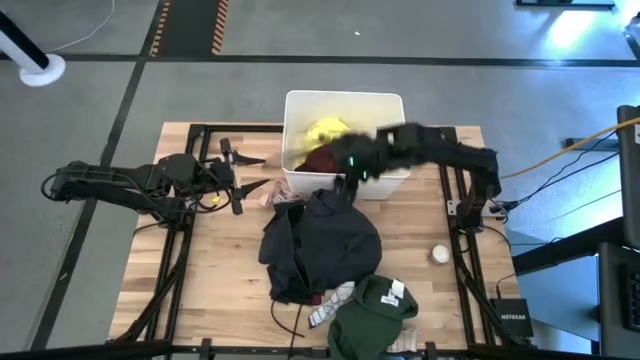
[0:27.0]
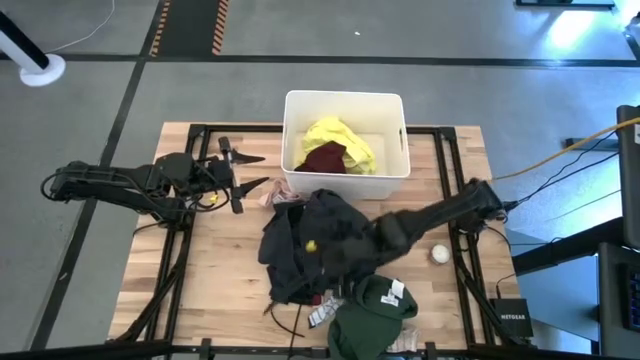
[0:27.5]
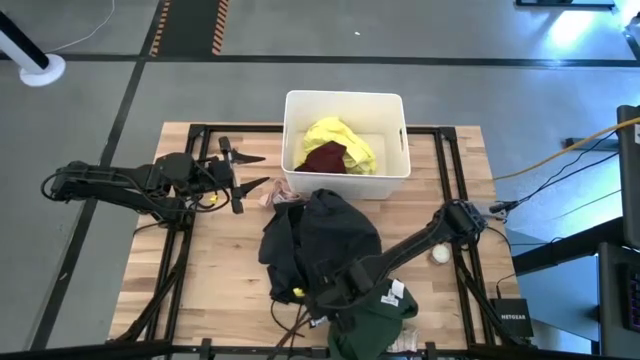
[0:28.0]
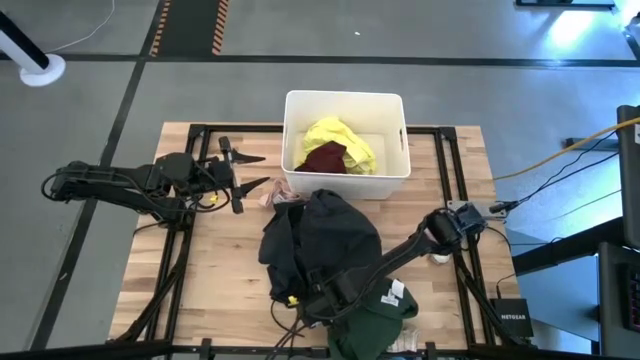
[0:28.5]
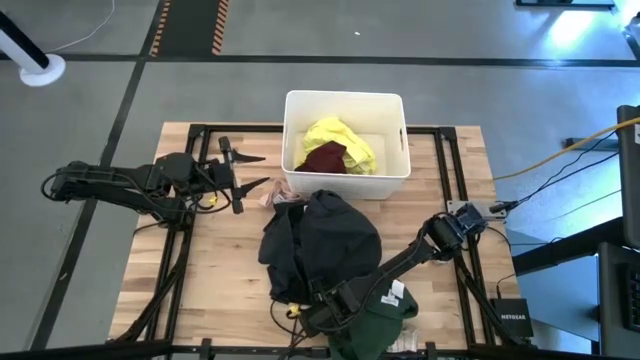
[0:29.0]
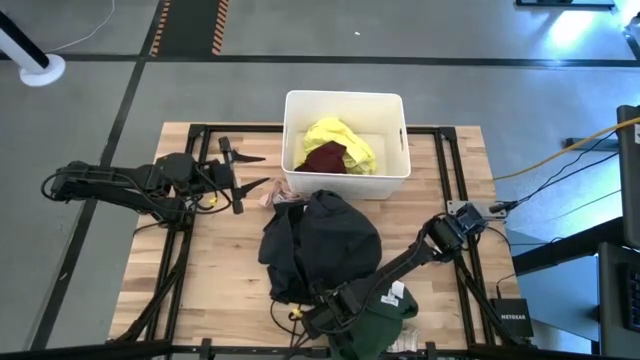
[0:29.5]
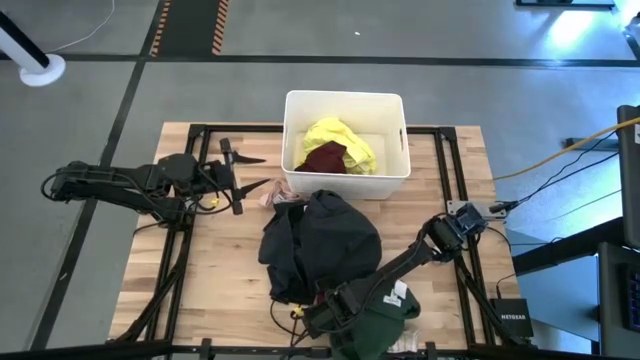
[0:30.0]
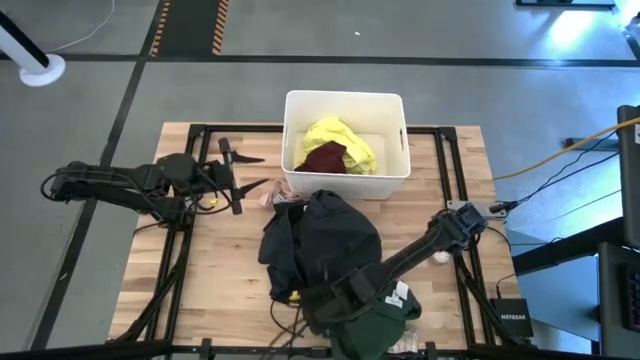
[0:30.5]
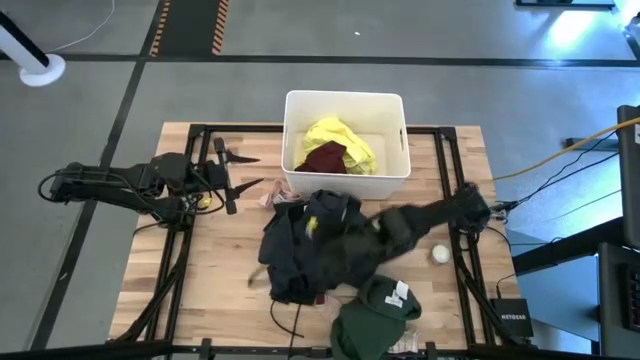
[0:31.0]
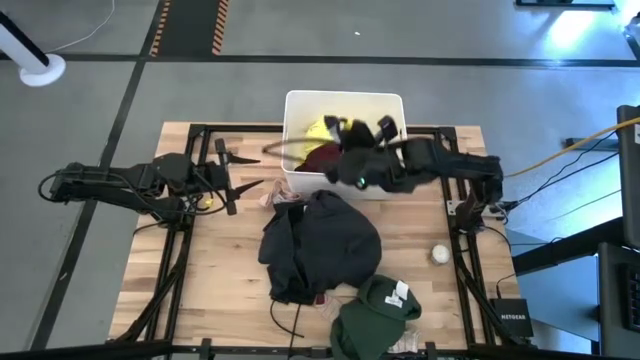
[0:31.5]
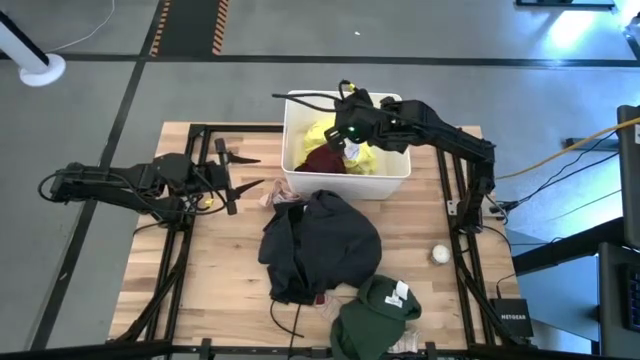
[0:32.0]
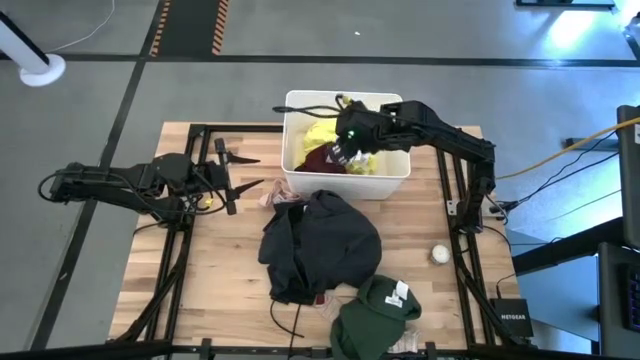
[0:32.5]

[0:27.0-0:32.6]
Task: Sort clothes
Put the blue and white sock into the white bin

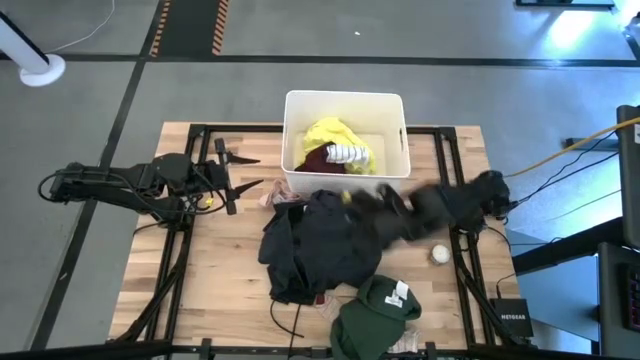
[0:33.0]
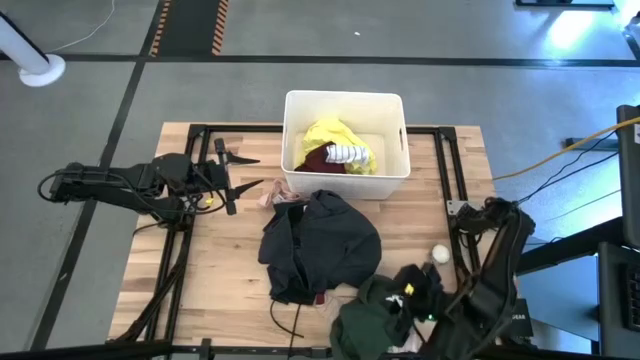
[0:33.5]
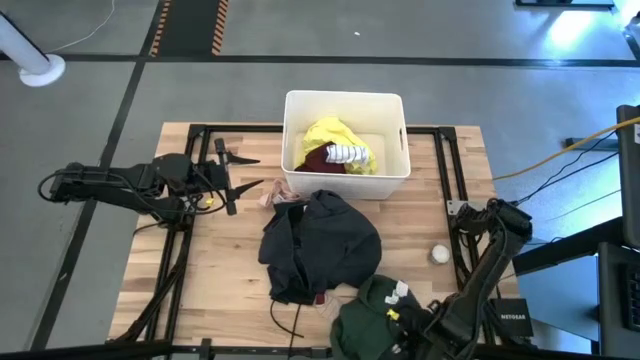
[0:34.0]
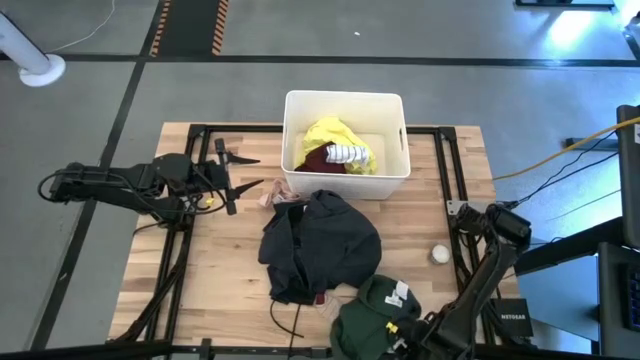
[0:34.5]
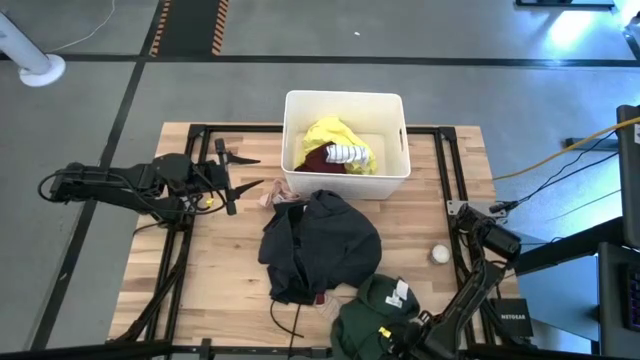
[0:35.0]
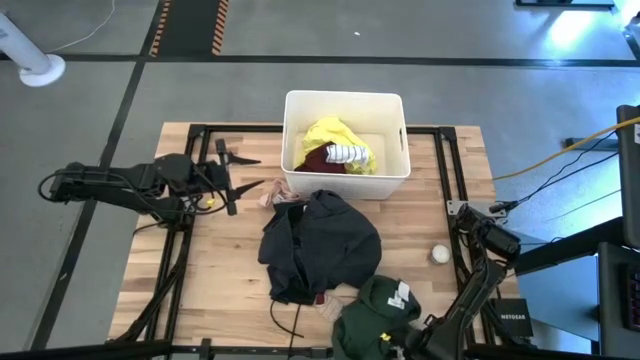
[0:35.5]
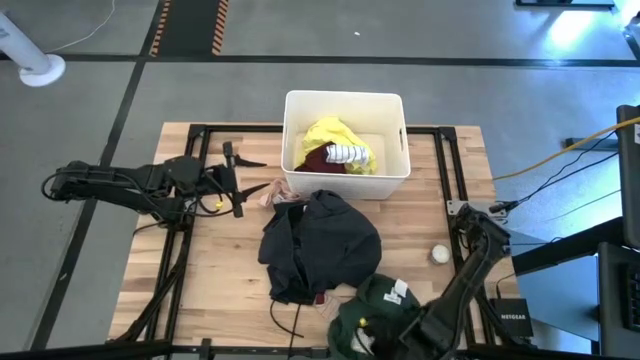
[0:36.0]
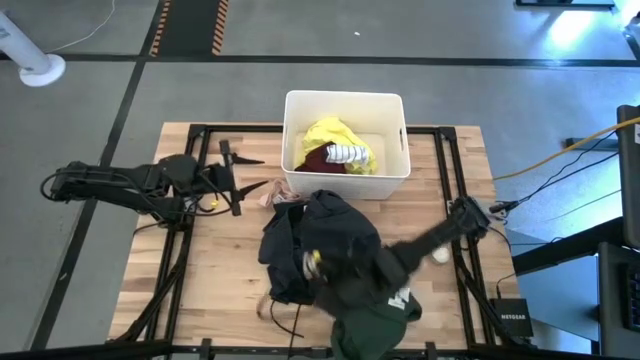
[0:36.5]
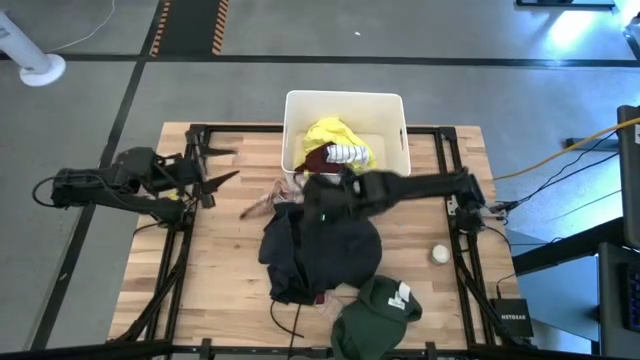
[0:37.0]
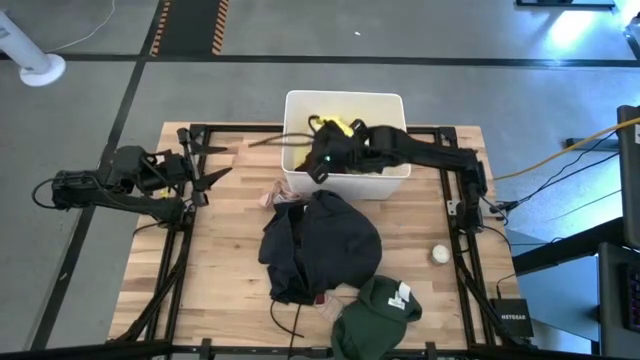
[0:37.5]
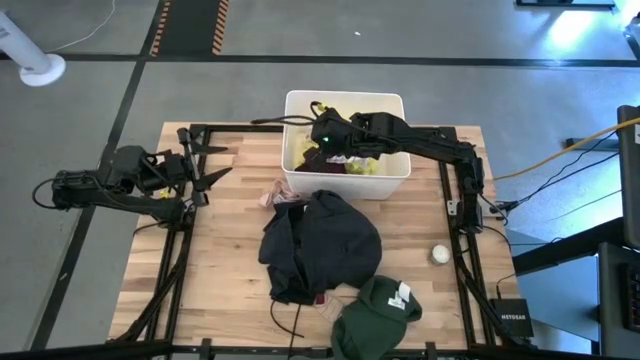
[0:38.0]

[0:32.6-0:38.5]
Put the right dark pink and white sock into the white bin

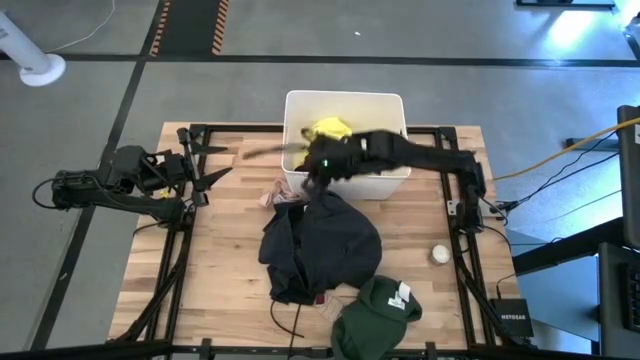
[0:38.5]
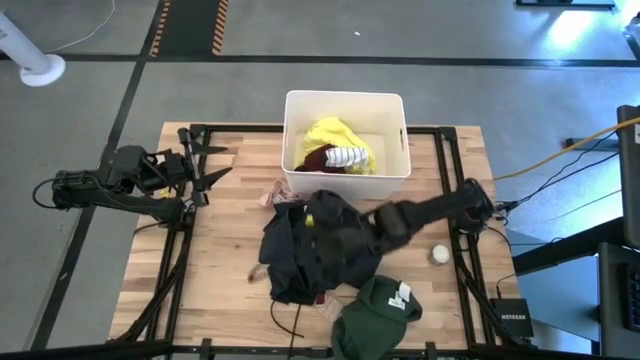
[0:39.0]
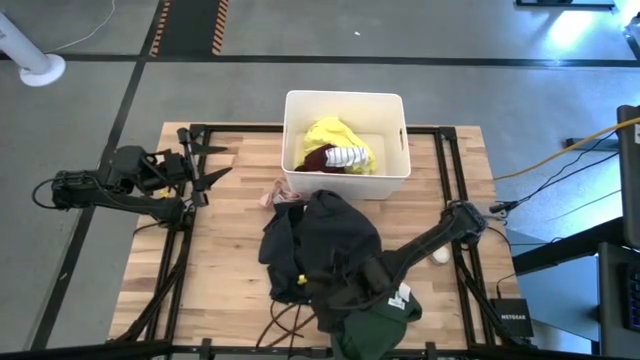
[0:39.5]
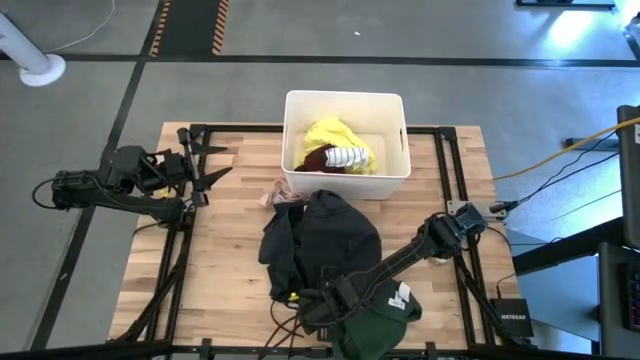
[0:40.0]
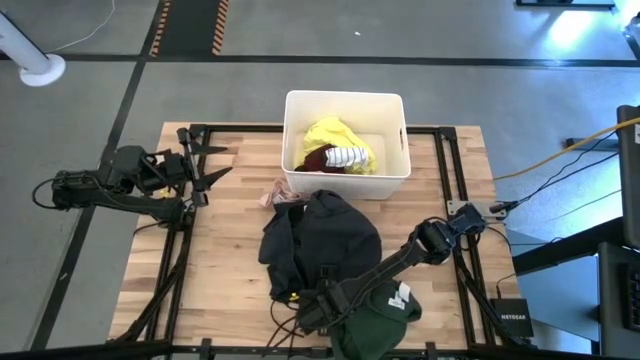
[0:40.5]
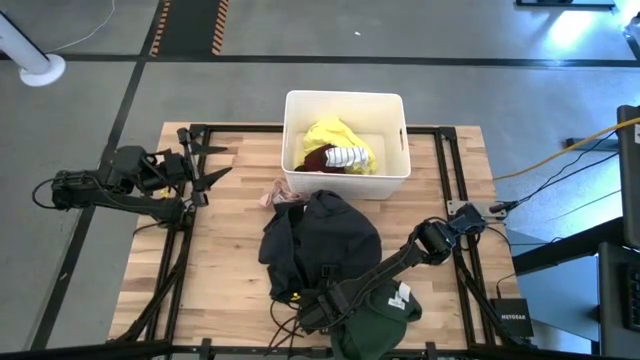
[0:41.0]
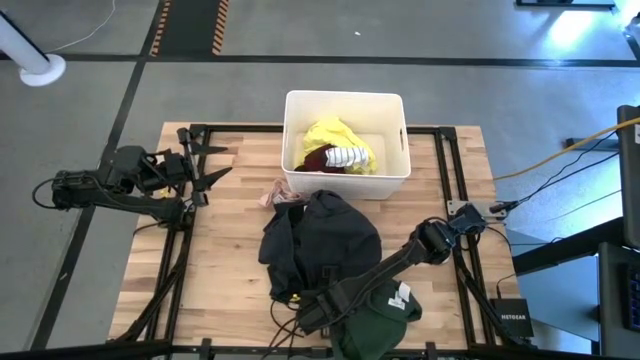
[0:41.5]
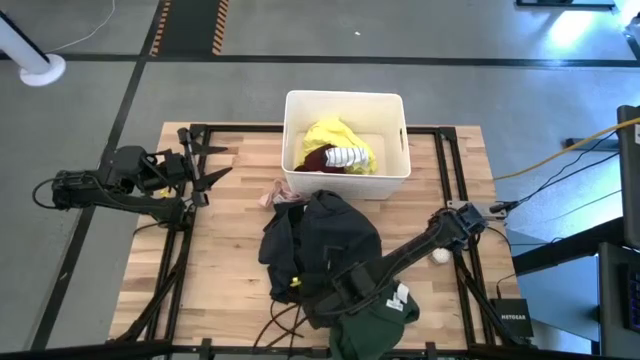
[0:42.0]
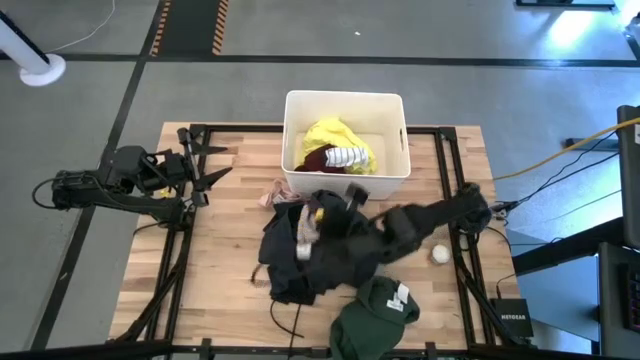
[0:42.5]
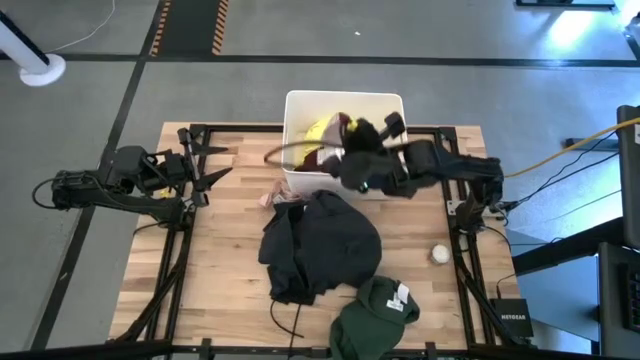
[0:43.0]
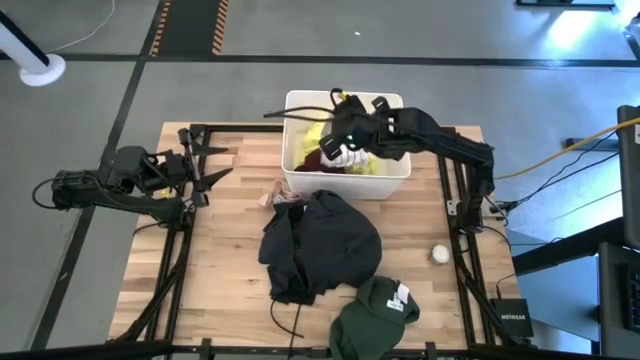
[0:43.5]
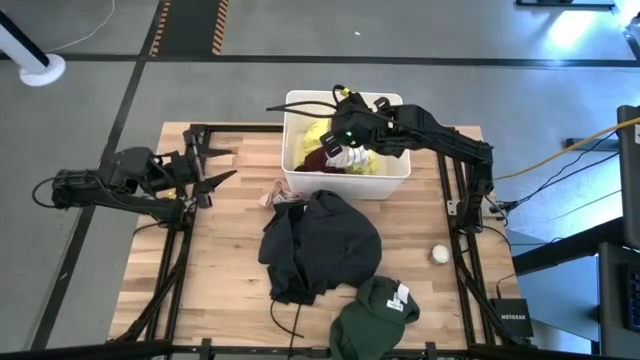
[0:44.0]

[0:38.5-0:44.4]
Put the dark pink and white sock into the white bin

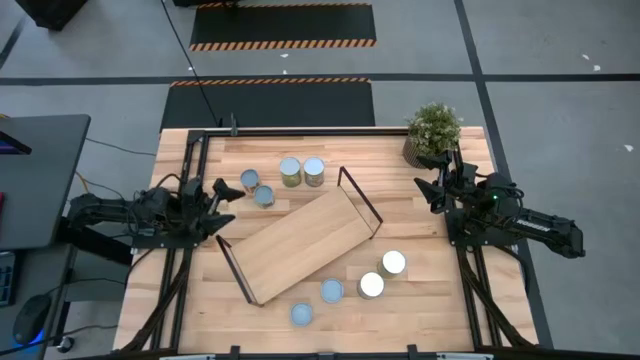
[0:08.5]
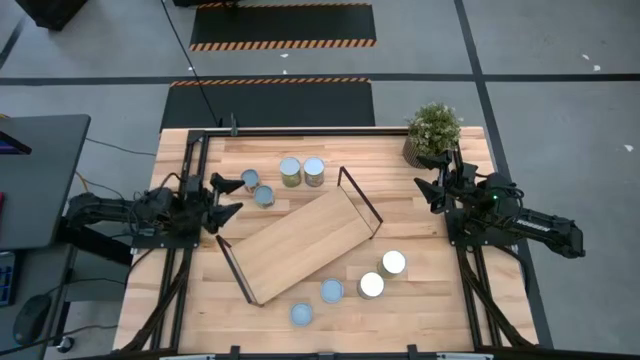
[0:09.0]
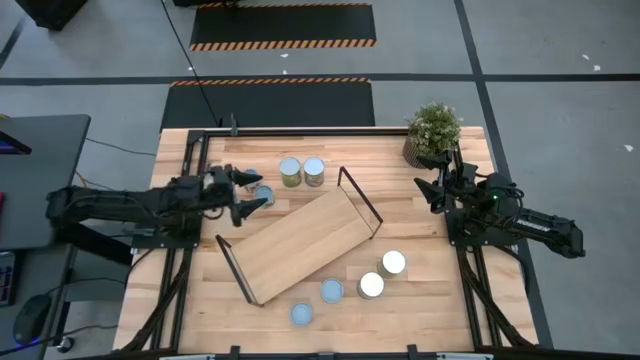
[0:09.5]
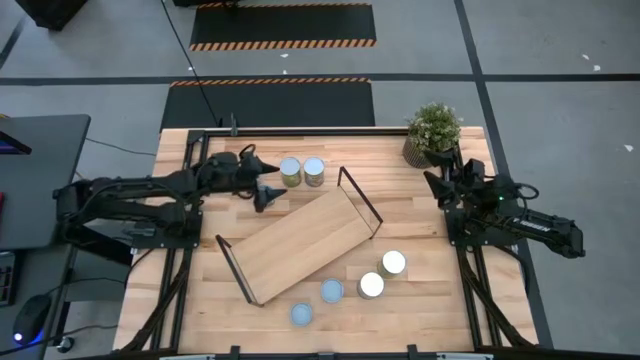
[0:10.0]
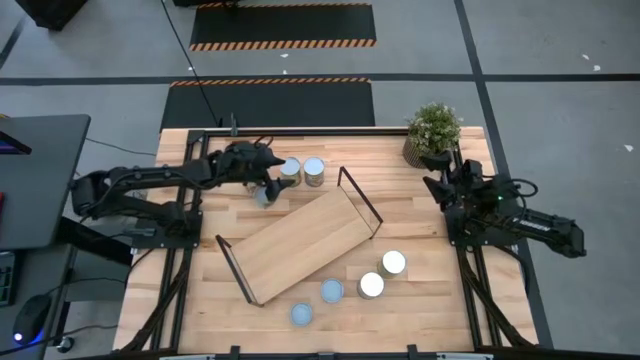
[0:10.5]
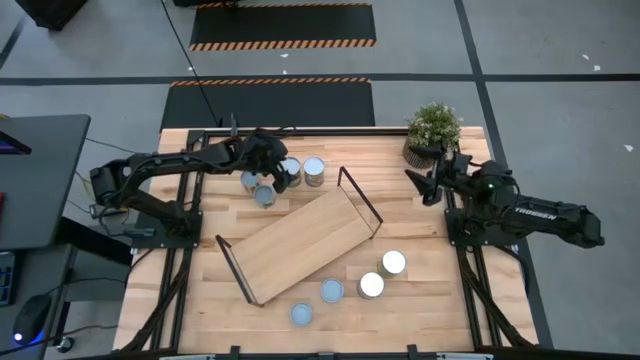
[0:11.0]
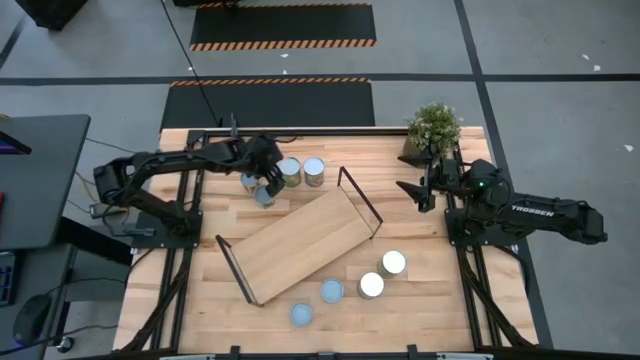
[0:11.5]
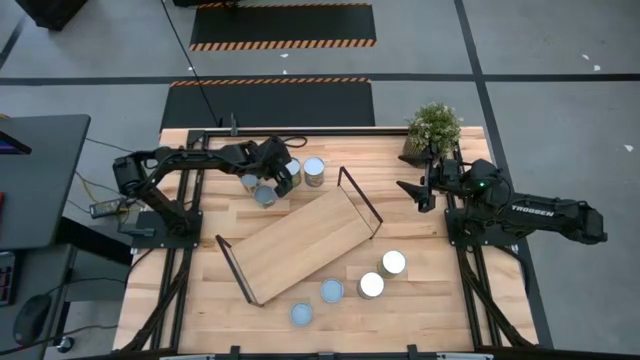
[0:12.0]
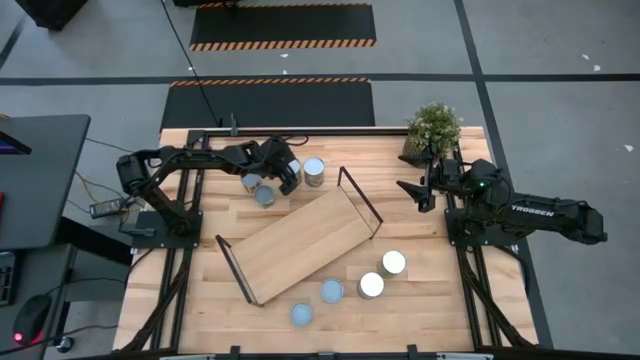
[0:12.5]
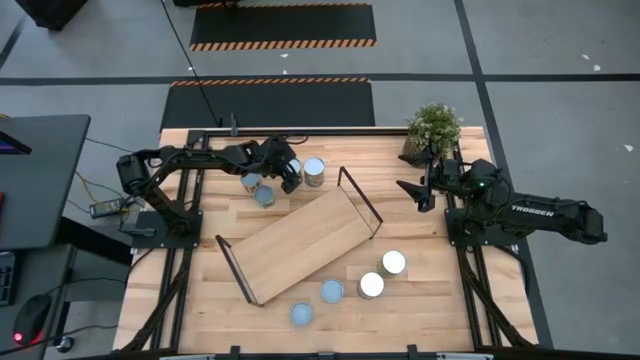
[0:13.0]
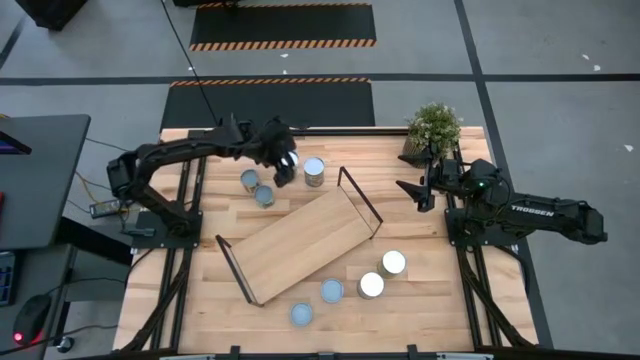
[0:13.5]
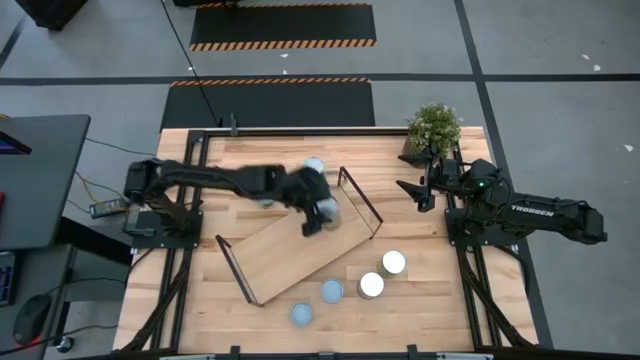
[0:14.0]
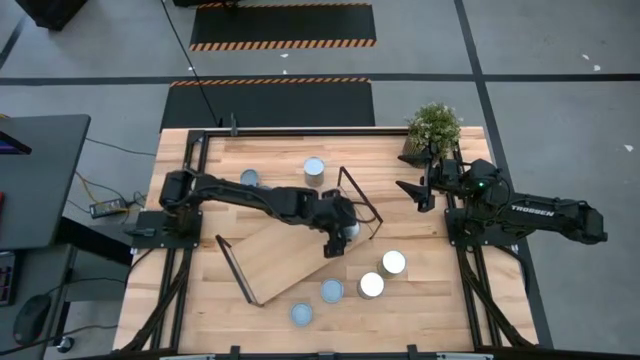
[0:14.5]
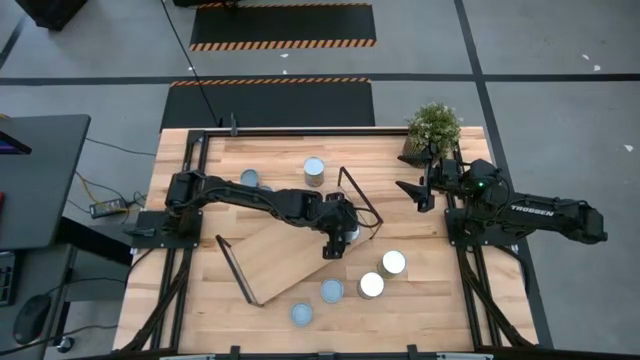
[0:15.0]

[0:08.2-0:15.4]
Task: Pick and place cans onto a shelf
Put the canned oranges on the shelf
